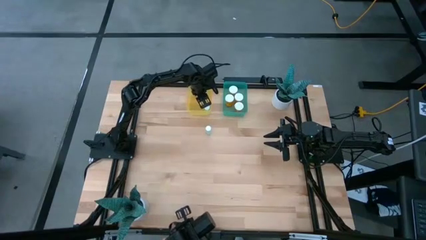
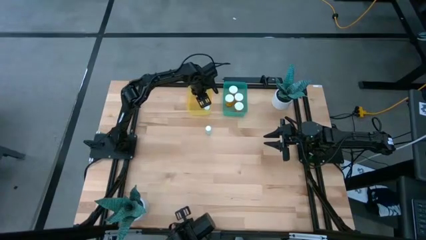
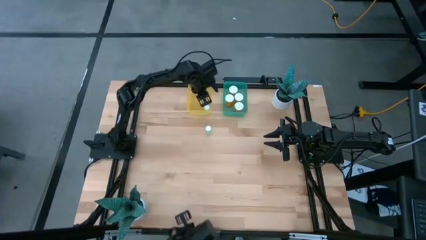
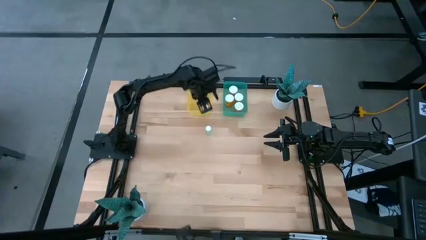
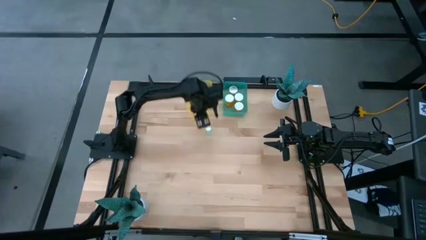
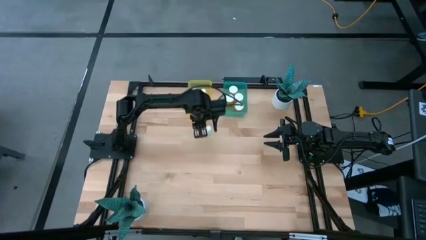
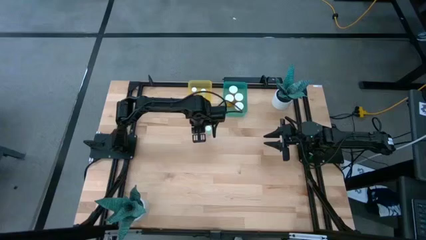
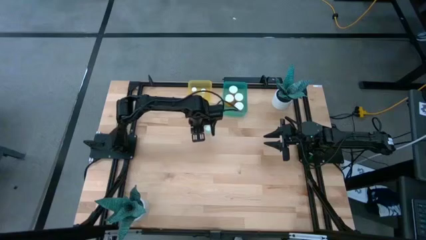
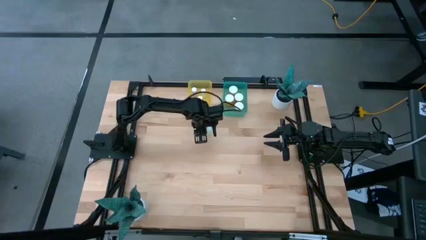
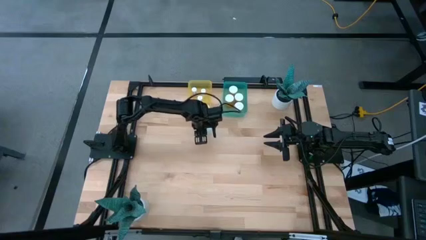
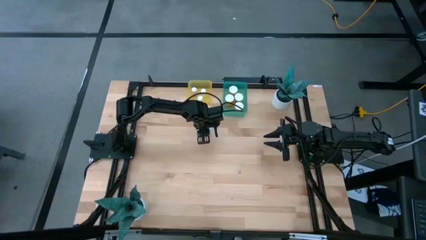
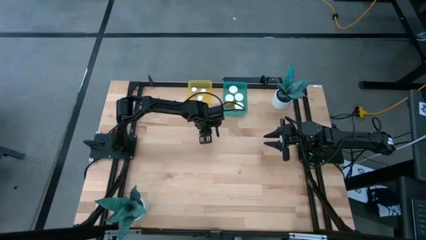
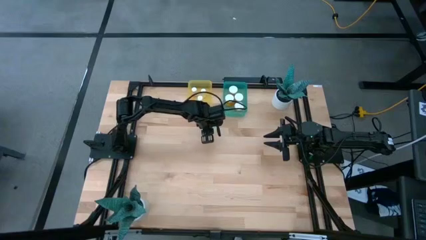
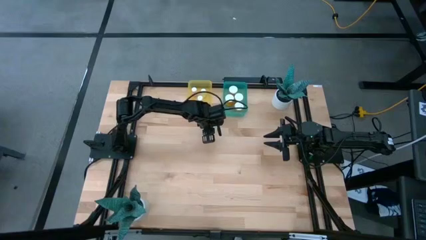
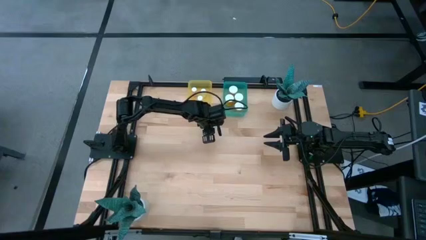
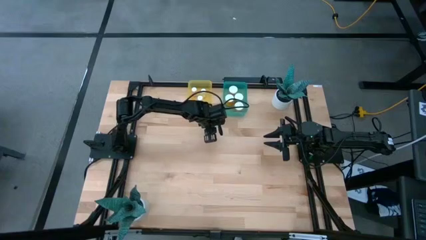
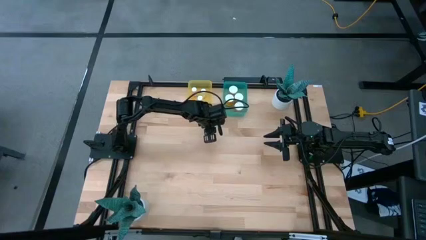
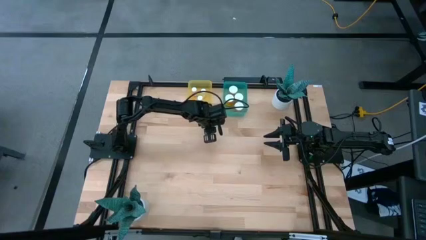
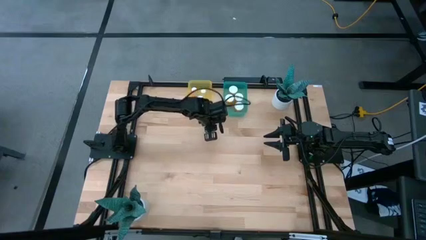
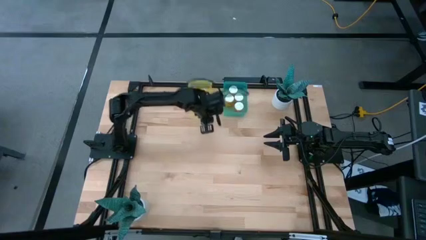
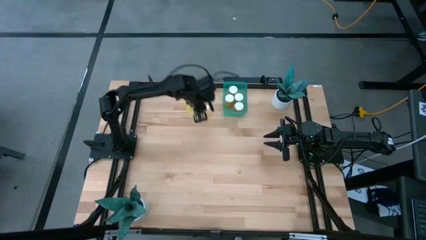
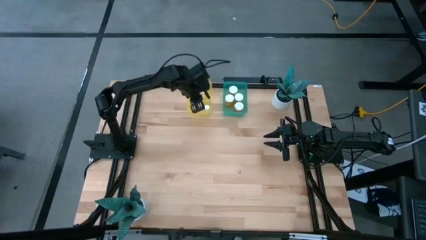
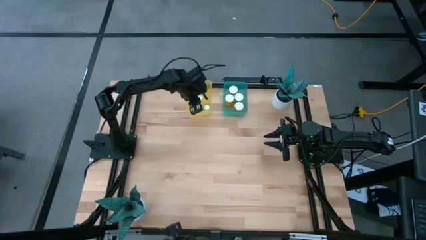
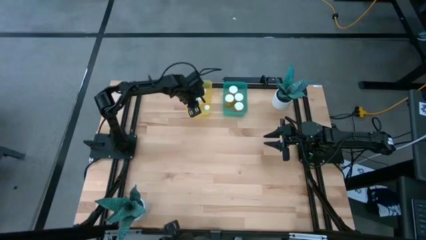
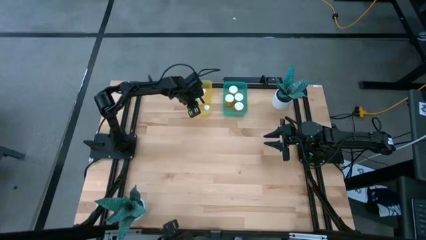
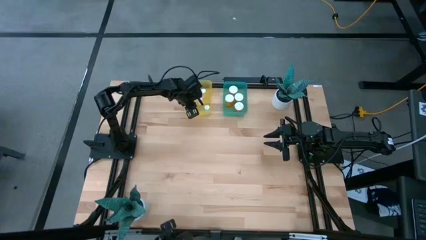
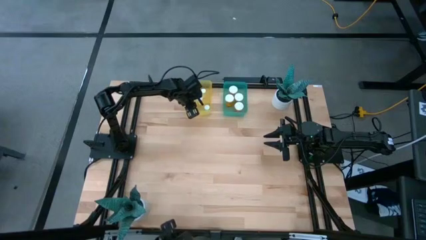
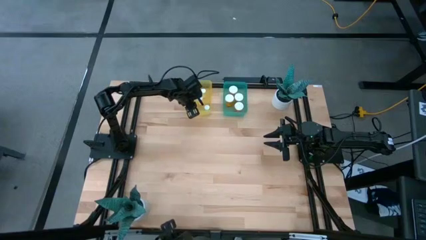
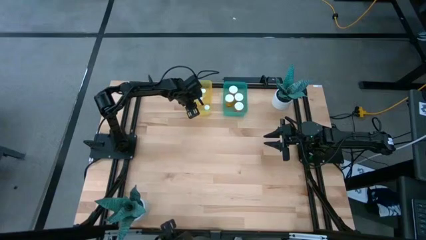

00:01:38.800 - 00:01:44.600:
Task: Pick and place medicine bottles into bin by pill shape (circle, oval)
Put the green tablet bottle into the yellow bin

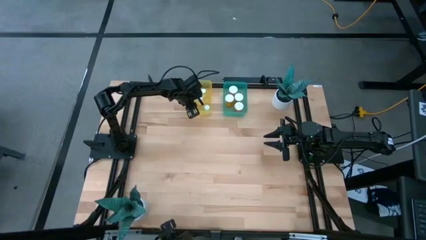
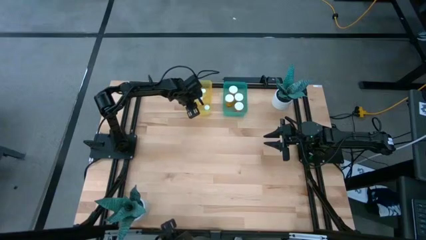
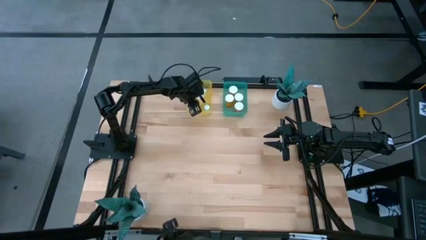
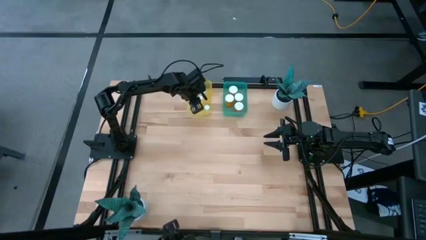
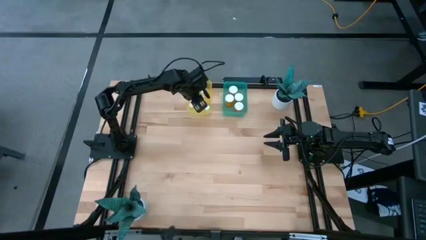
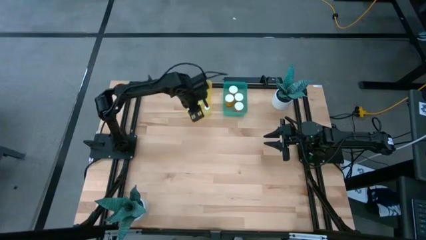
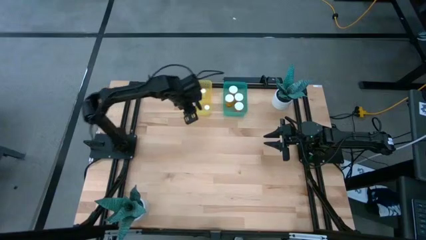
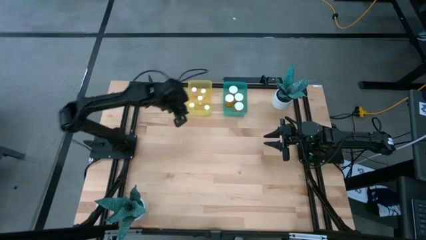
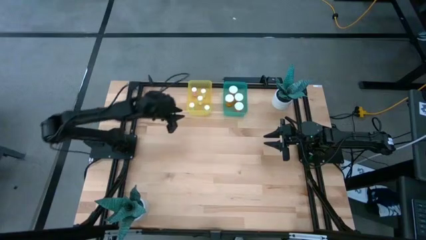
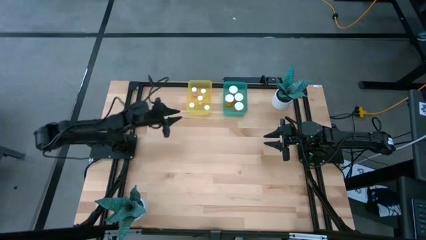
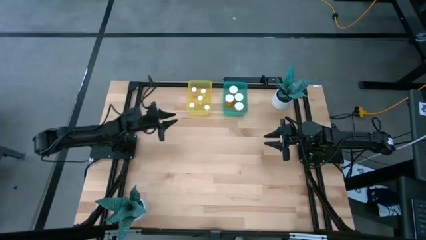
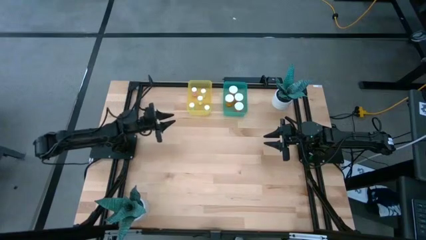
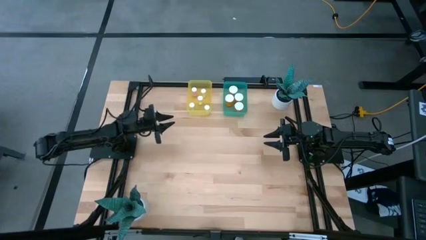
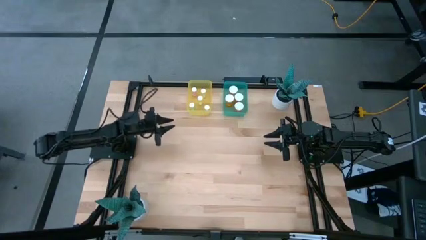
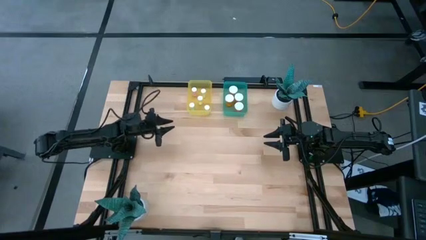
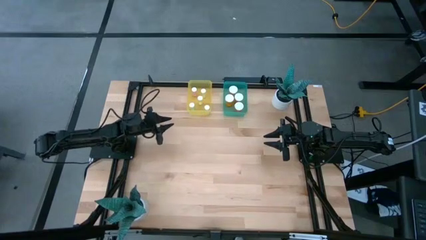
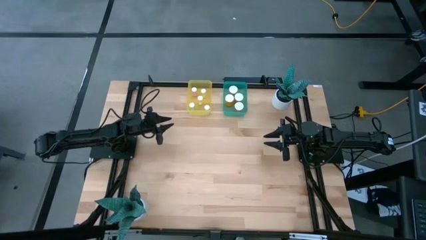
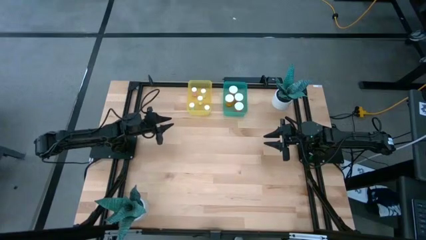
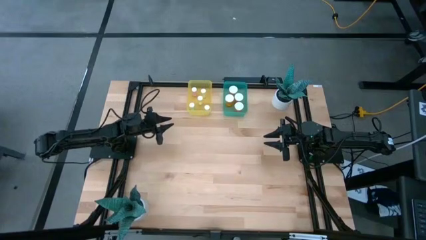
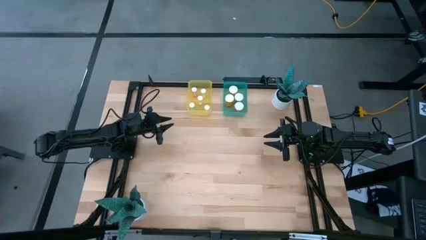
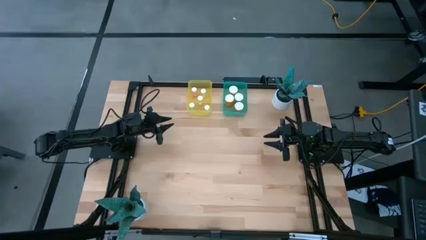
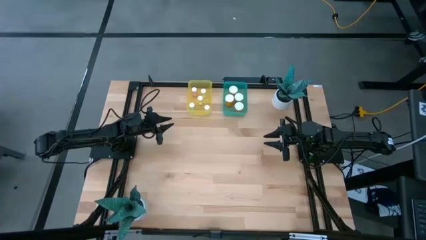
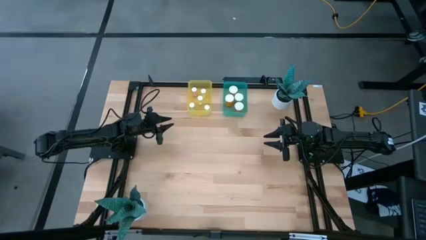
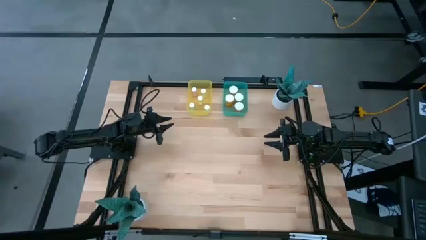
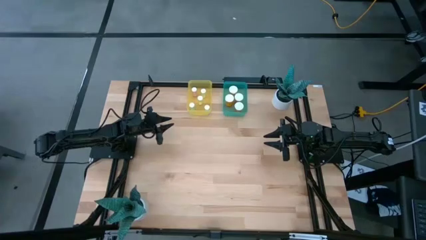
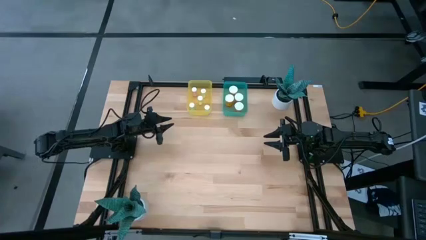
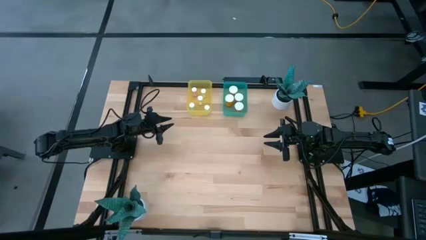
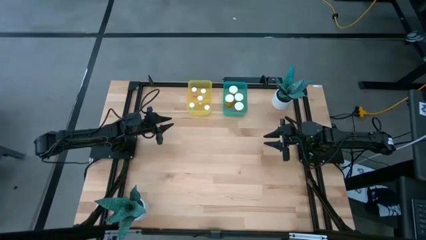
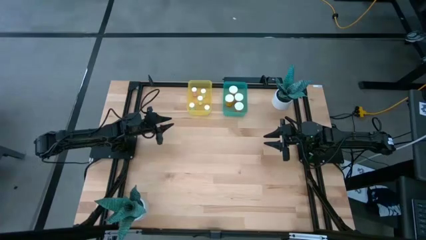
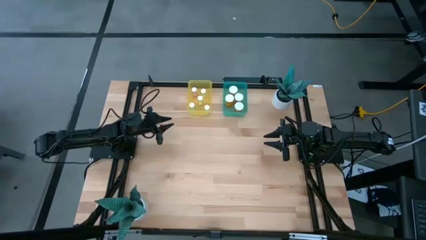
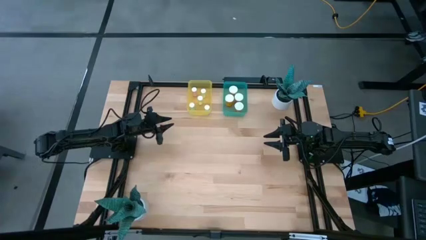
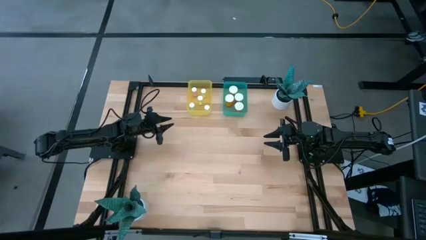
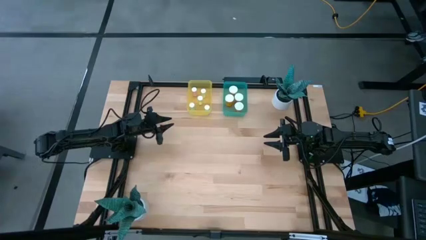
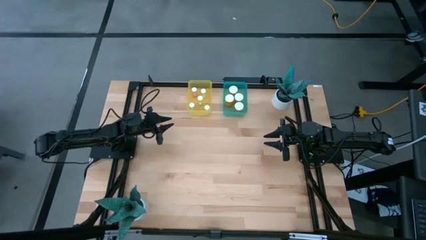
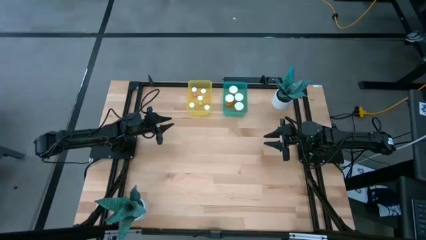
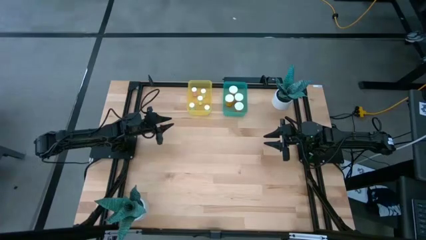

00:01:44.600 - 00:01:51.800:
Return to Home Position

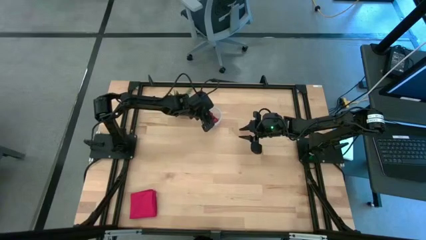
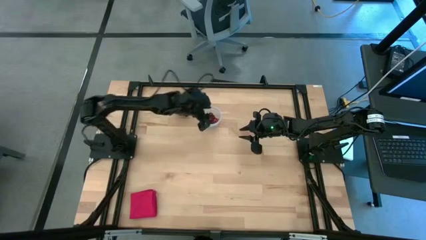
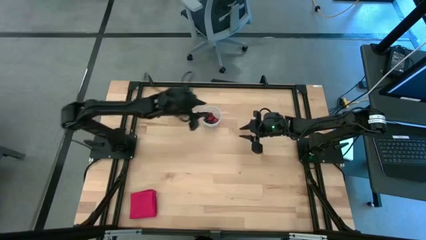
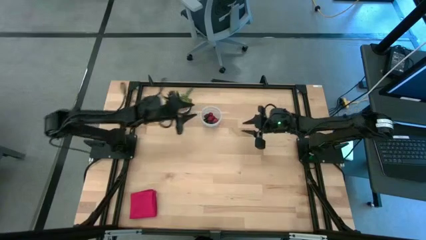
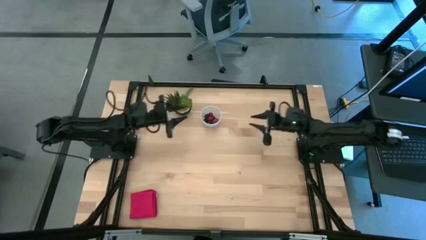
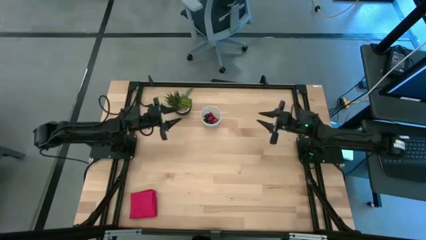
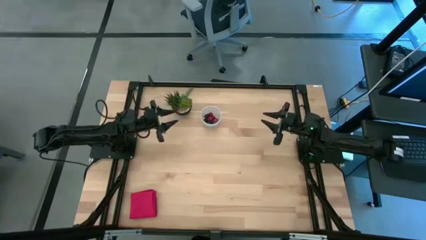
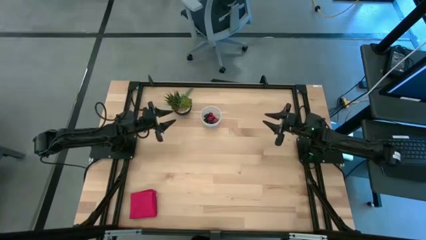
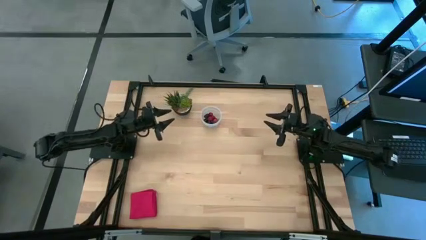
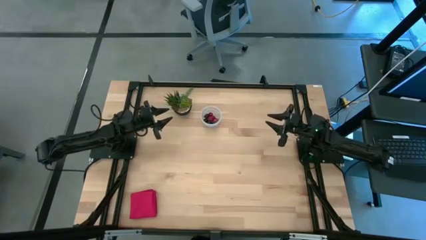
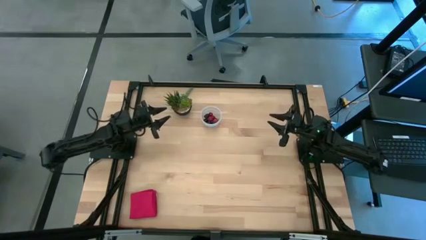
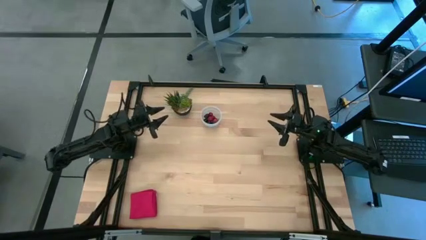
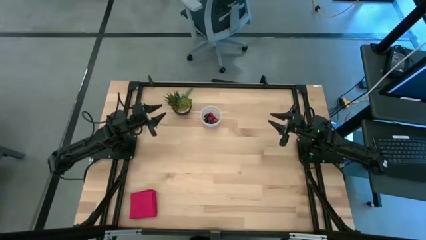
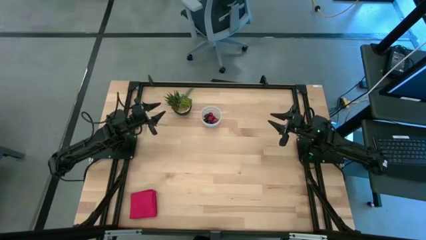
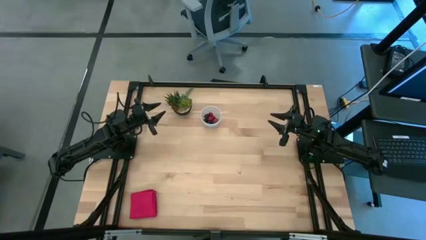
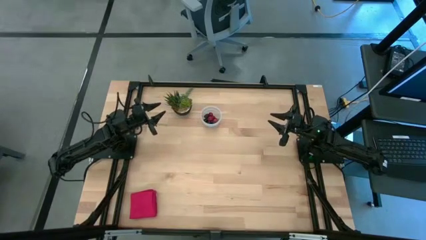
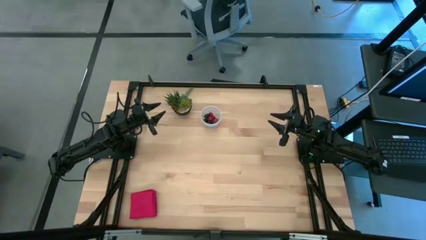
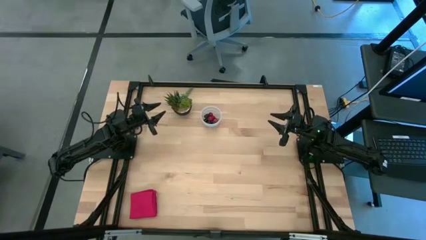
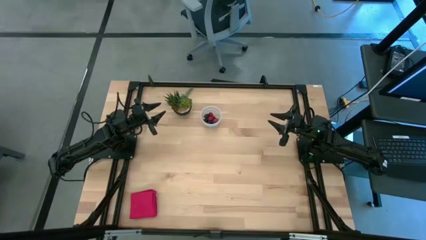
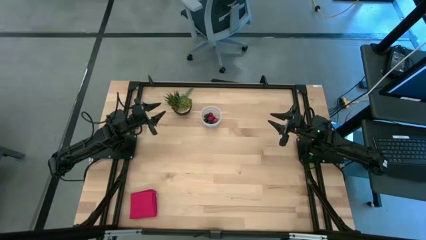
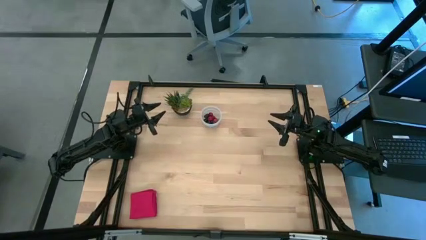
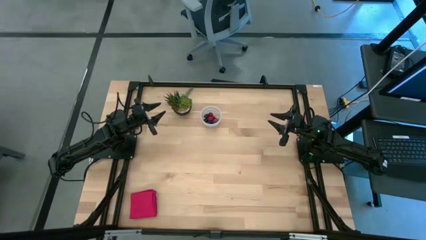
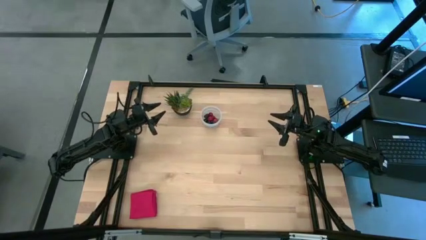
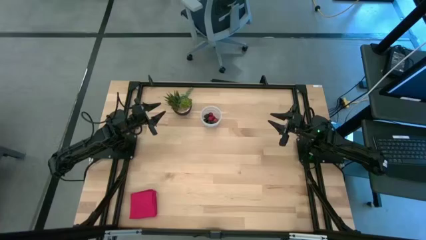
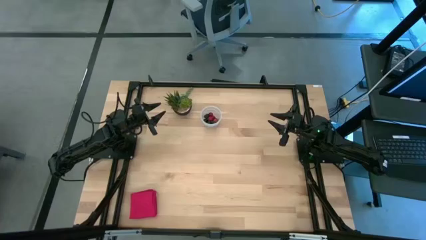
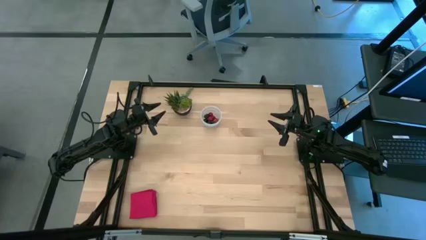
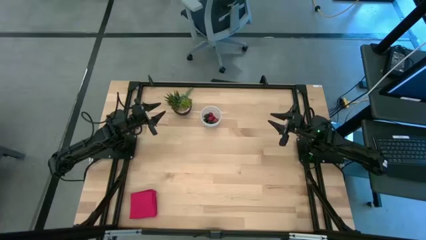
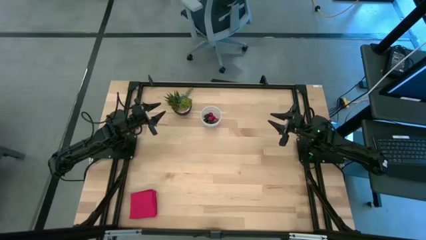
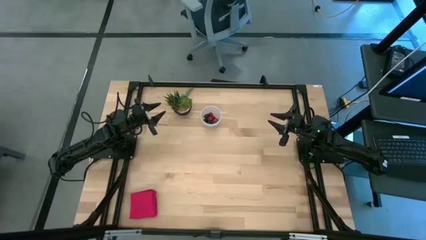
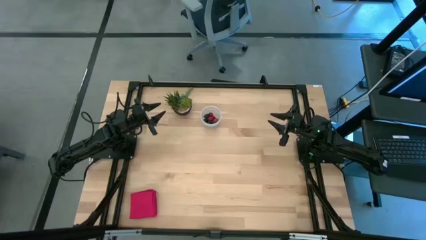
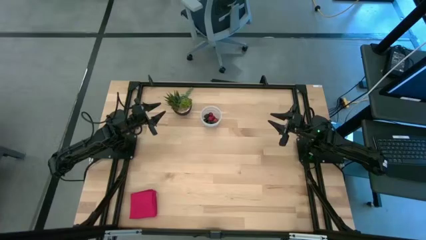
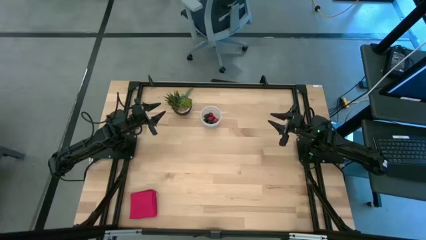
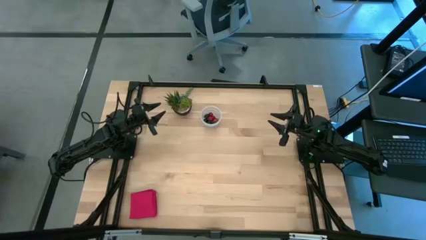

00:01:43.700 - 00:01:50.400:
Task: Pick and placing Produce into tupperware
Return to Home Position
